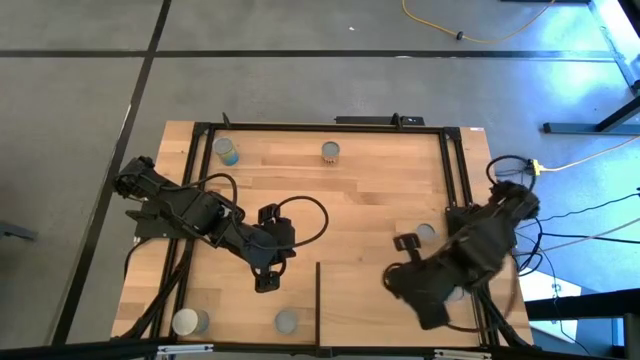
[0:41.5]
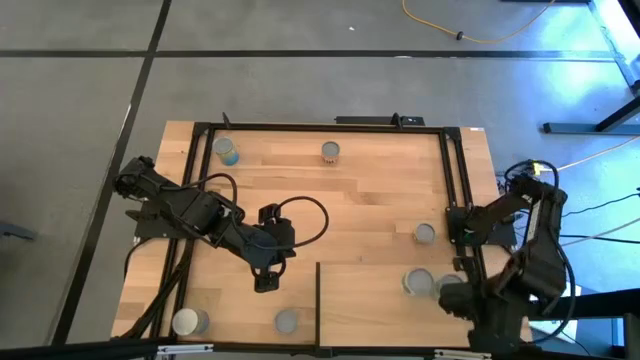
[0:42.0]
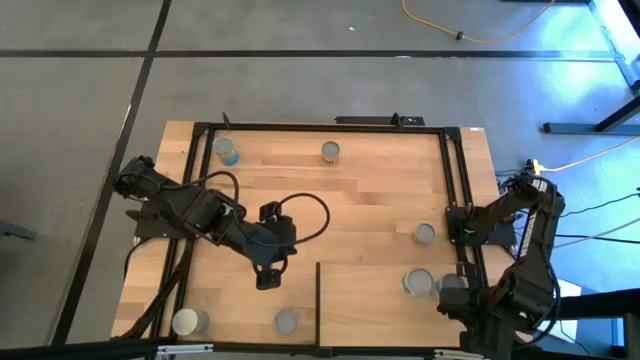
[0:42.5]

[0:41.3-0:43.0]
Task: Pick and place cans onto a shelf
Adjust the pink canned chicken soup on the shelf

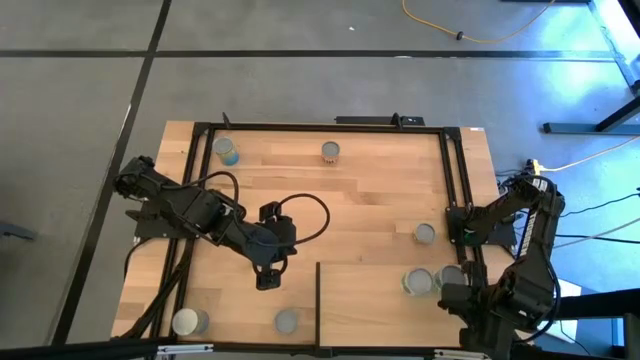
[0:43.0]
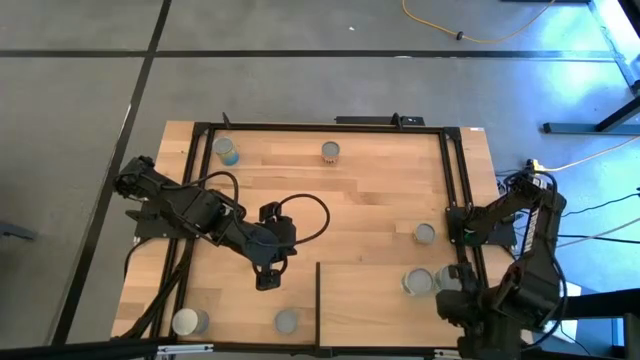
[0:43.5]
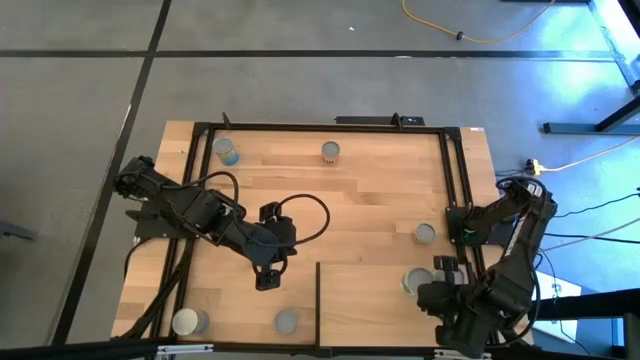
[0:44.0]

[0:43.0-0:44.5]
Adjust the white canned mixed vegetables on the shelf

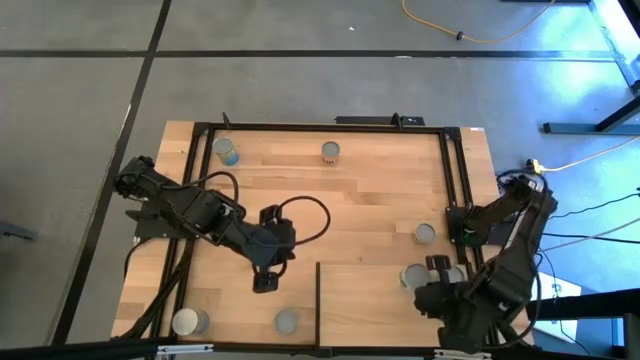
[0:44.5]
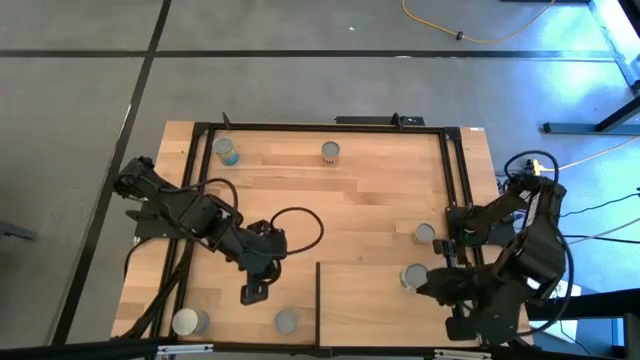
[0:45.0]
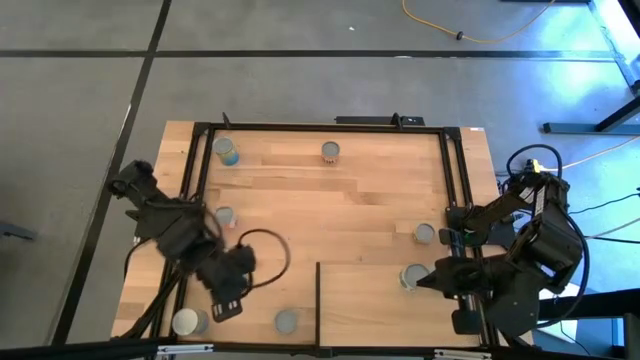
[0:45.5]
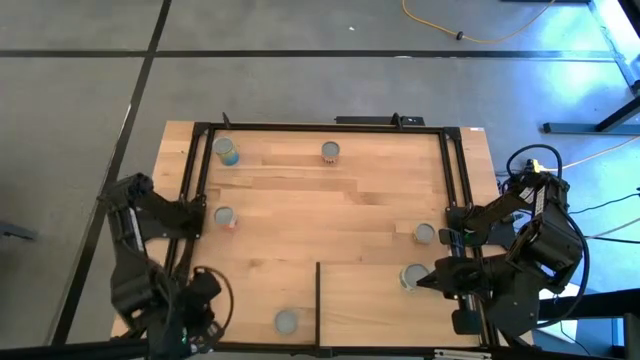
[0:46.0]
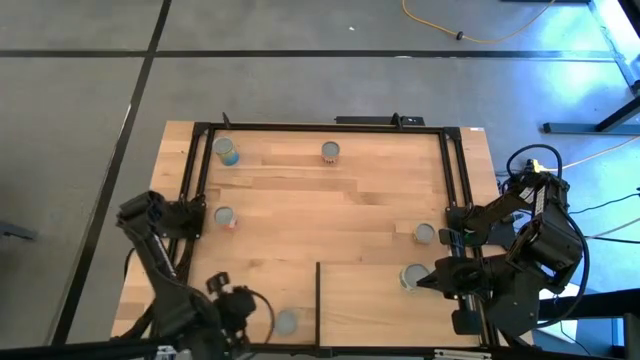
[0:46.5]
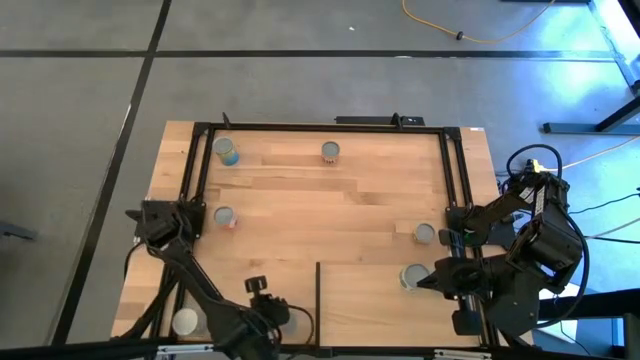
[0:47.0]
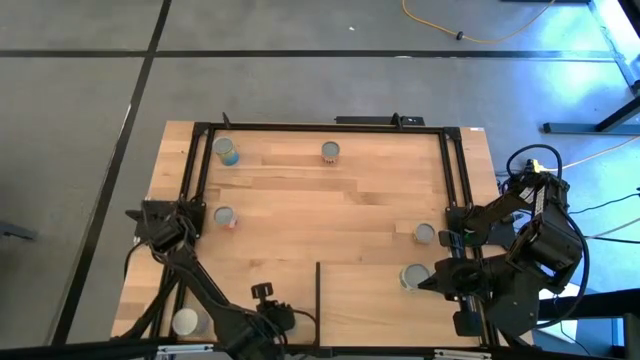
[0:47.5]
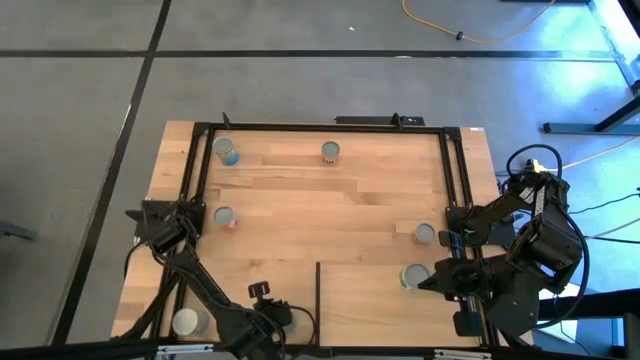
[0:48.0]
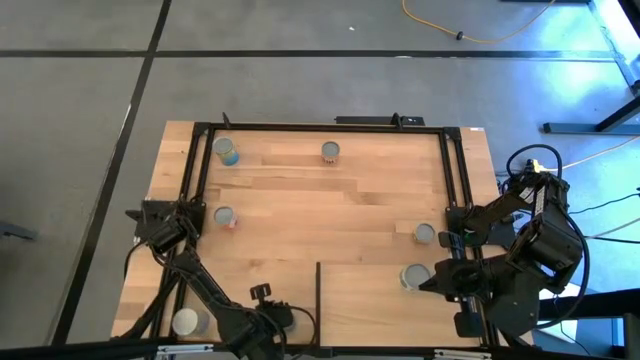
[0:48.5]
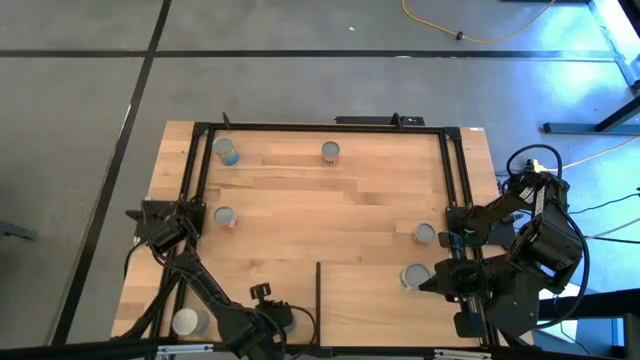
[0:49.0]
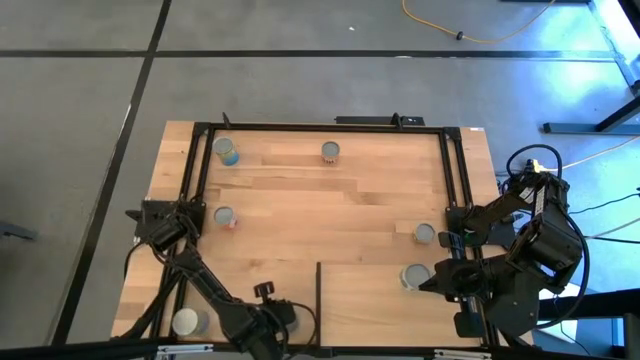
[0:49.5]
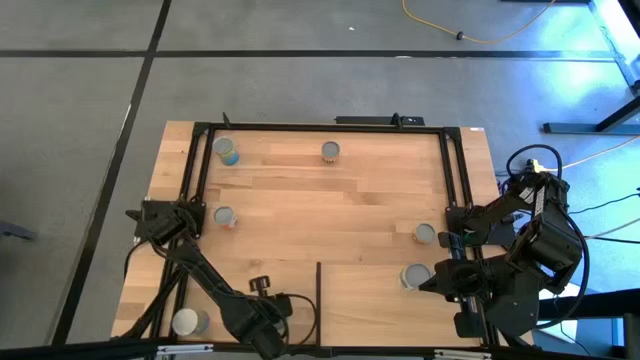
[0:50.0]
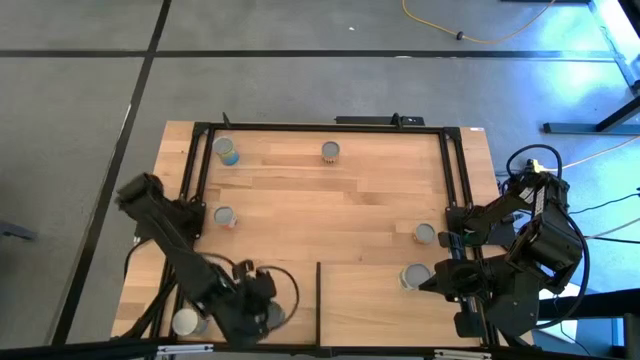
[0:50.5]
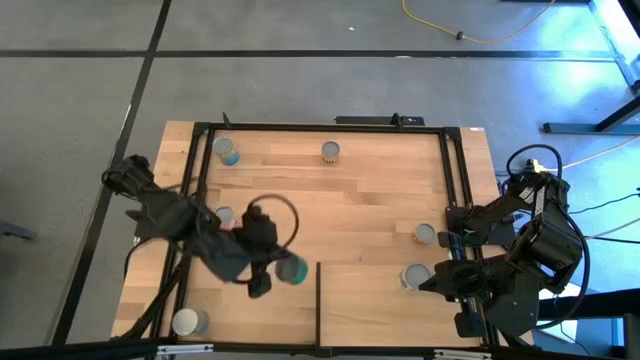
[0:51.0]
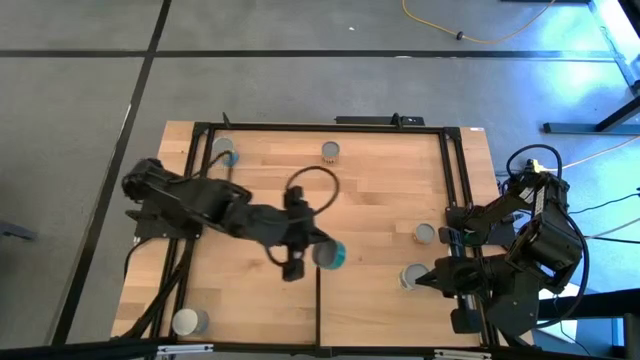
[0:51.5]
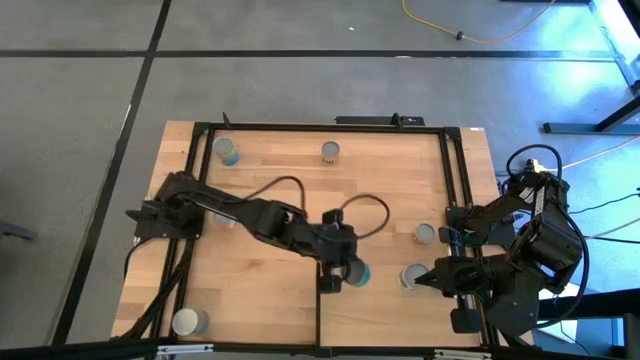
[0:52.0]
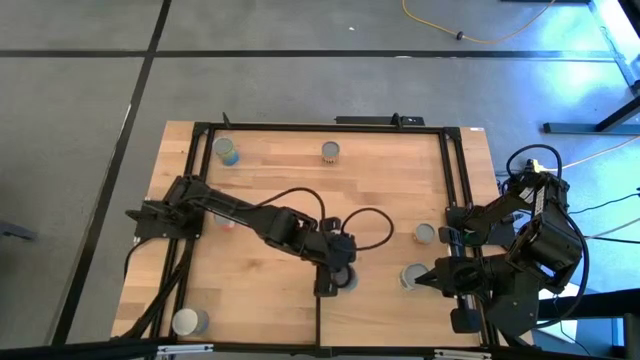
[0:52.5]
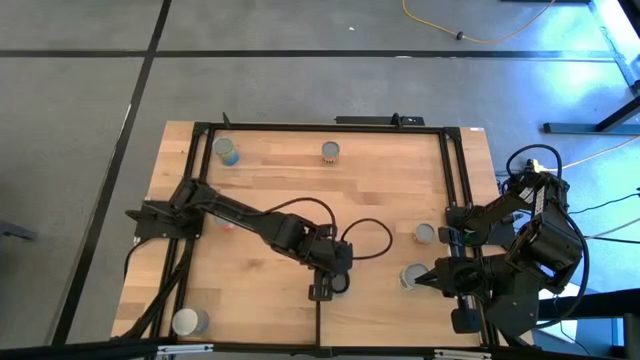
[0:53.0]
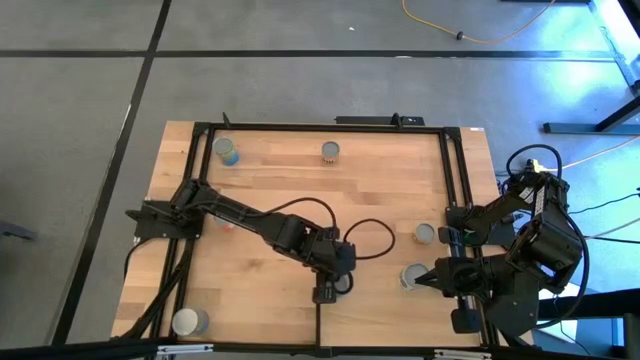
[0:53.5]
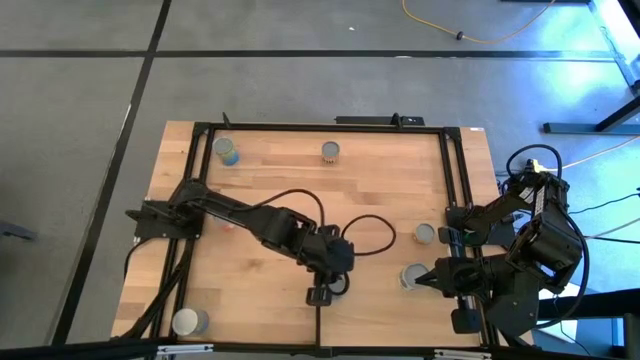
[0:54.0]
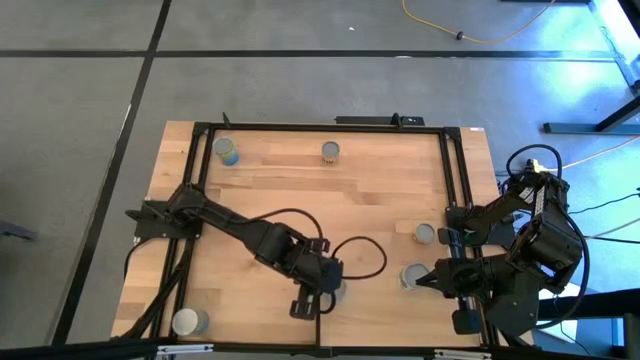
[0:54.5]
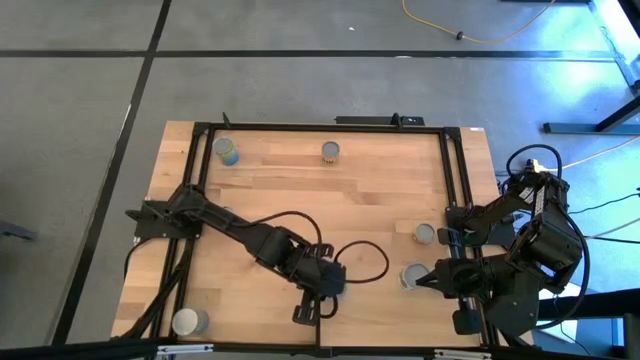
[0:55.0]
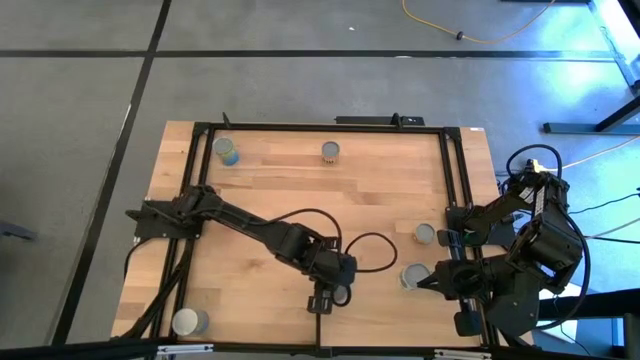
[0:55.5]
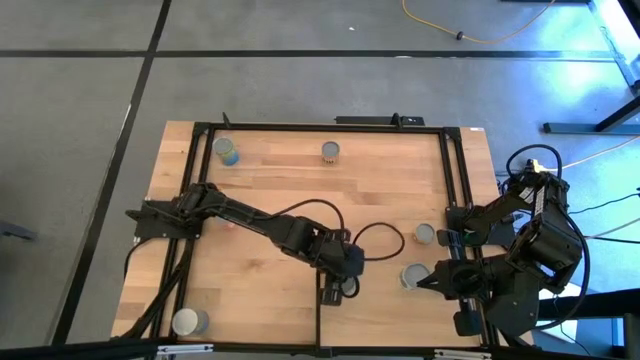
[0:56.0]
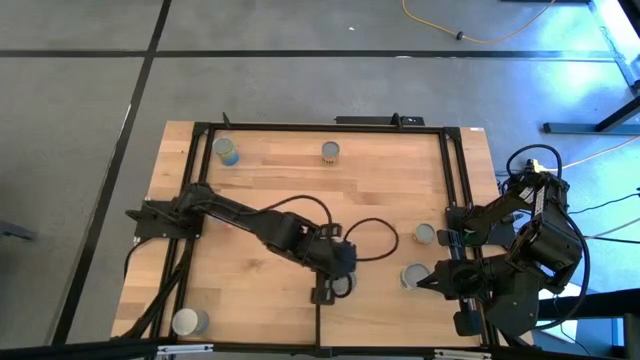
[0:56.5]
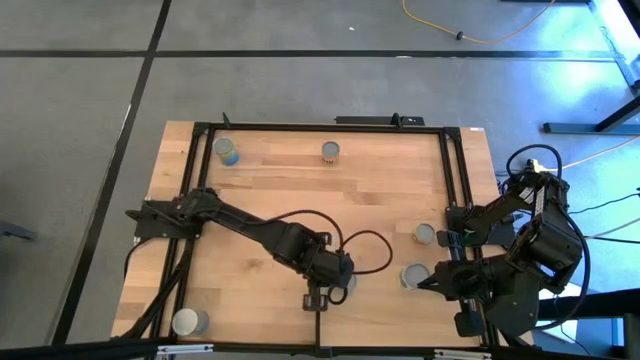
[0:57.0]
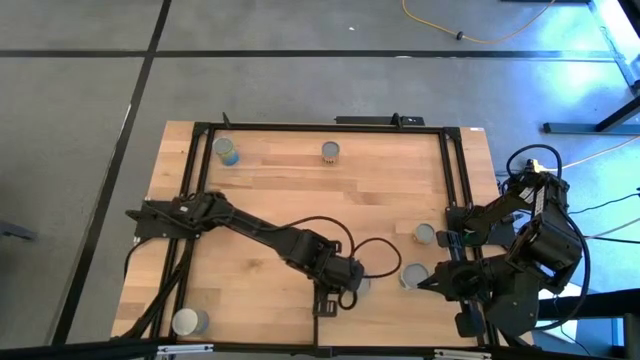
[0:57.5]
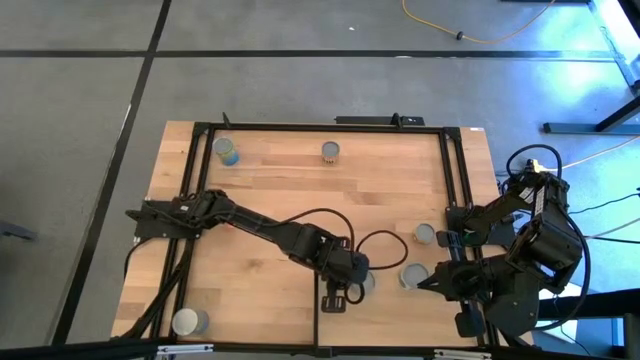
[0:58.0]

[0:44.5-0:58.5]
Put the green tuna can on the shelf

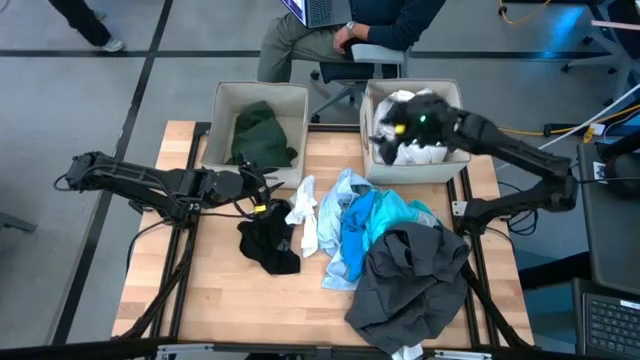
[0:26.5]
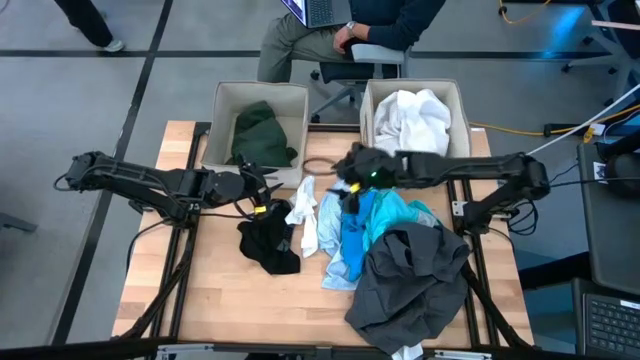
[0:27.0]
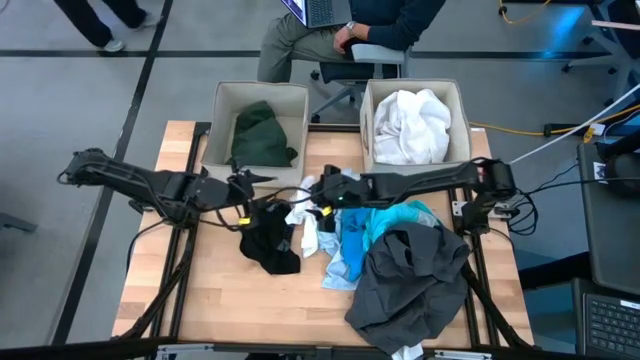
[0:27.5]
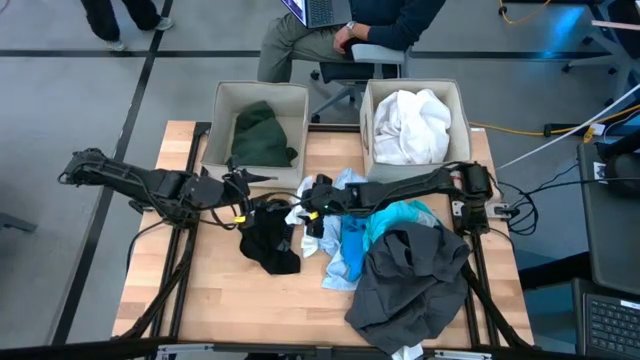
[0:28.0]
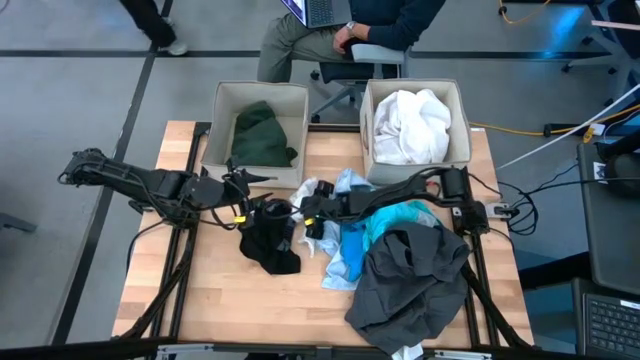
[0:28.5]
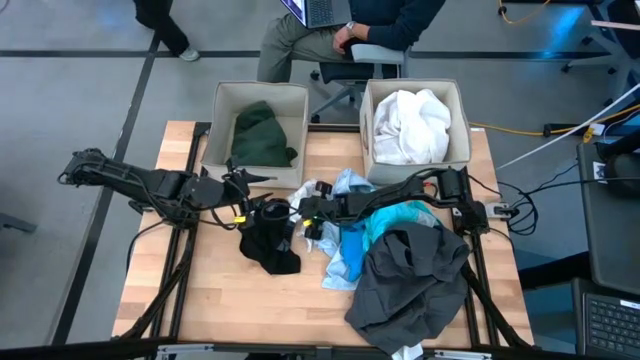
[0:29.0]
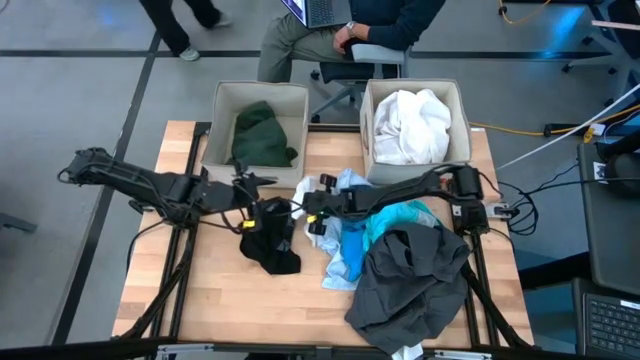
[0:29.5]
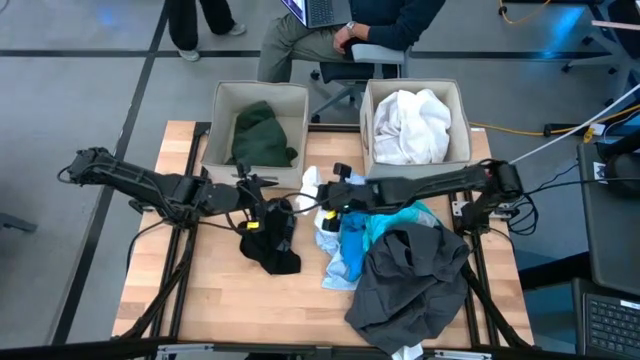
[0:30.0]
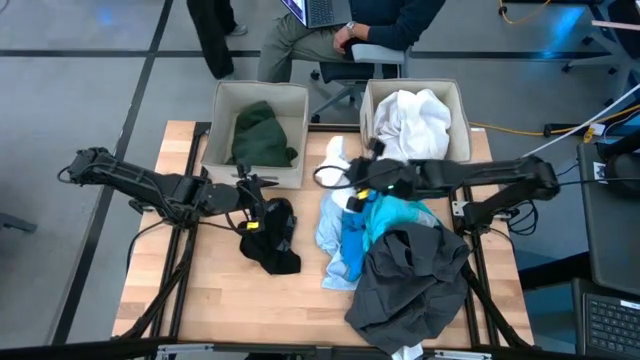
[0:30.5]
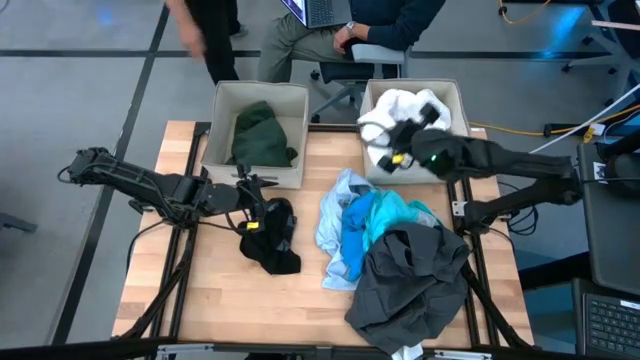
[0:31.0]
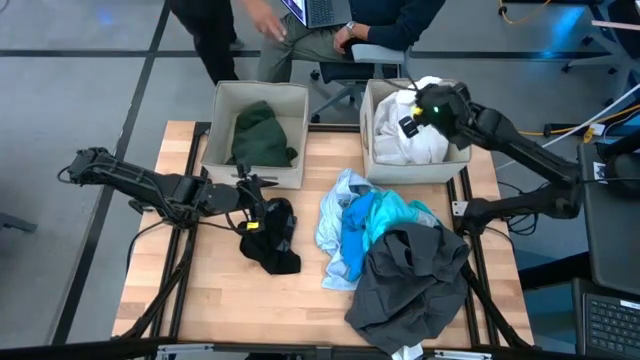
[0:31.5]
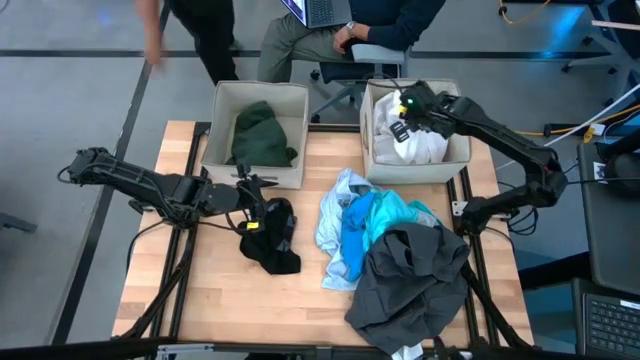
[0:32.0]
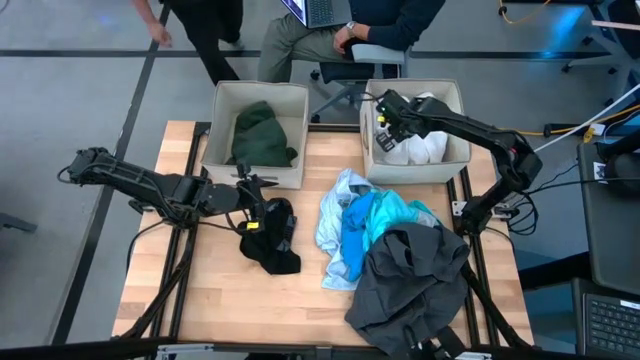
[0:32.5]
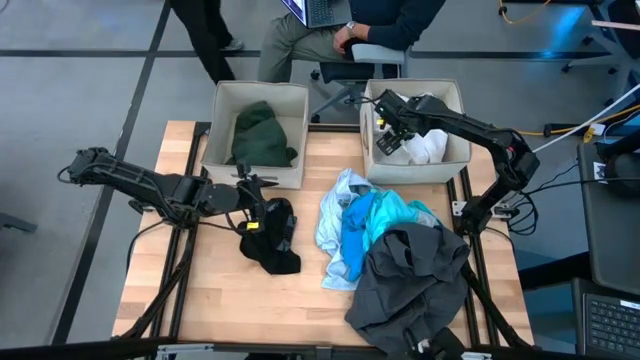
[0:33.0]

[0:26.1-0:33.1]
Task: Sort clothes
Put the white boxers into the right laundry organizer
